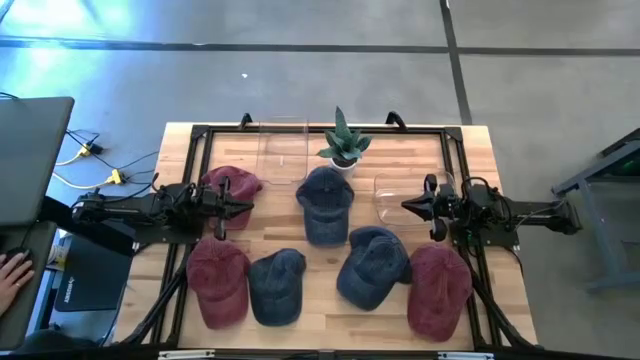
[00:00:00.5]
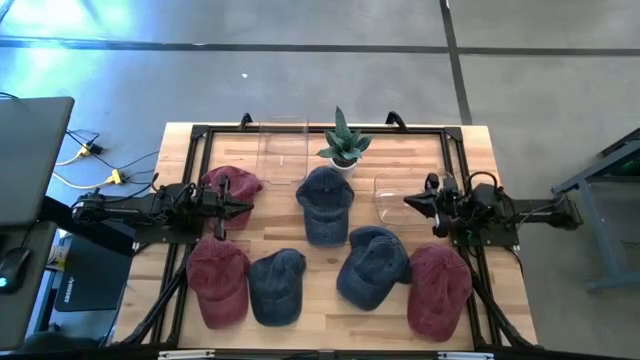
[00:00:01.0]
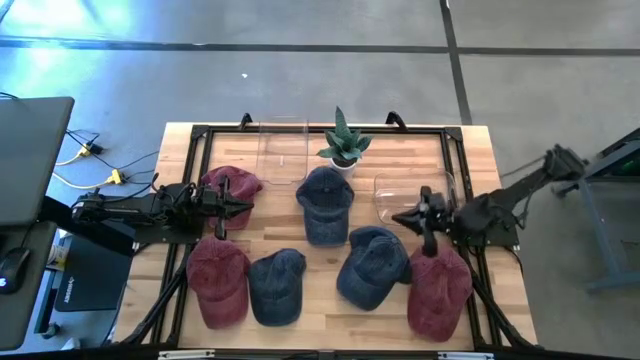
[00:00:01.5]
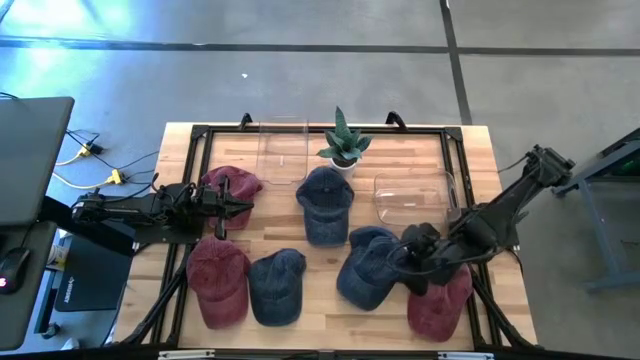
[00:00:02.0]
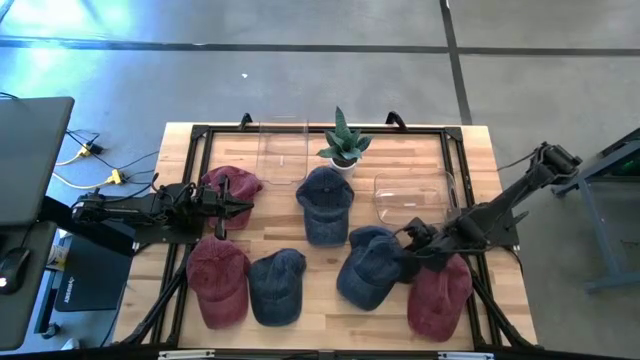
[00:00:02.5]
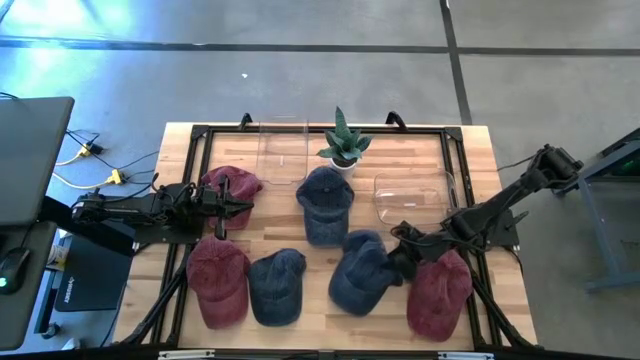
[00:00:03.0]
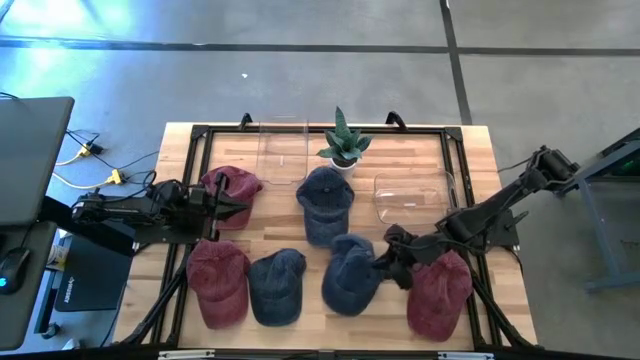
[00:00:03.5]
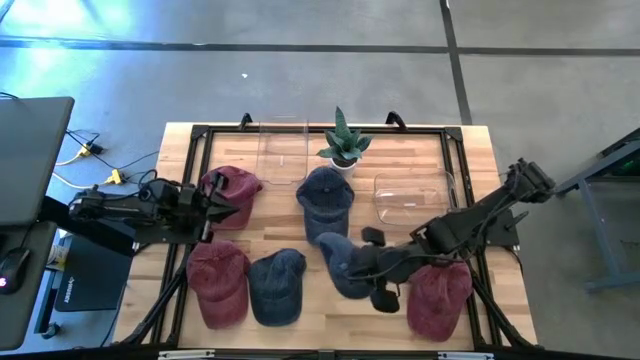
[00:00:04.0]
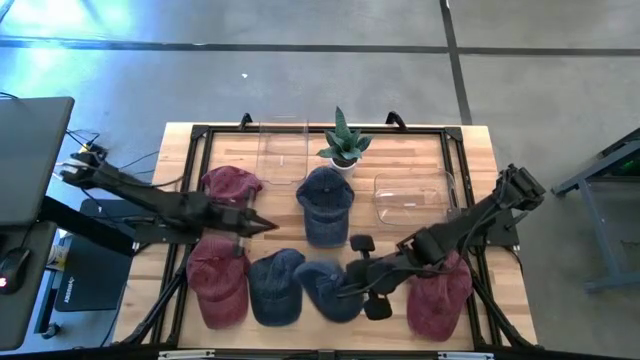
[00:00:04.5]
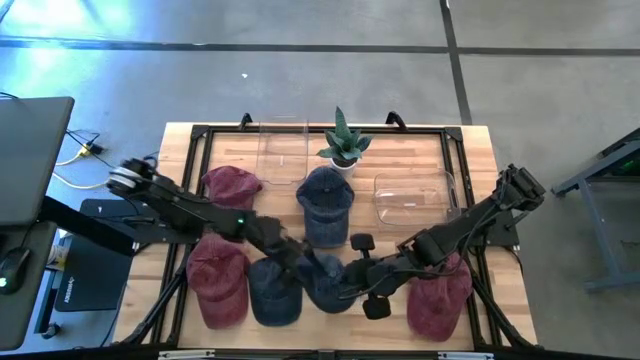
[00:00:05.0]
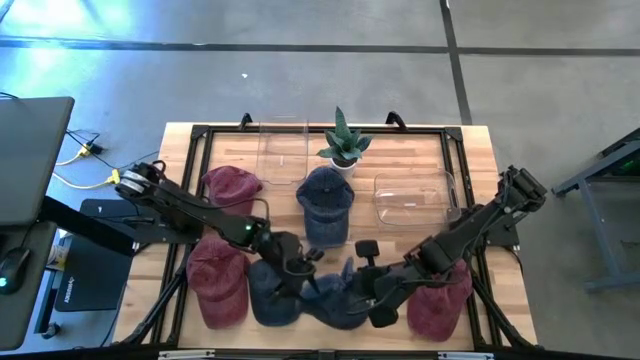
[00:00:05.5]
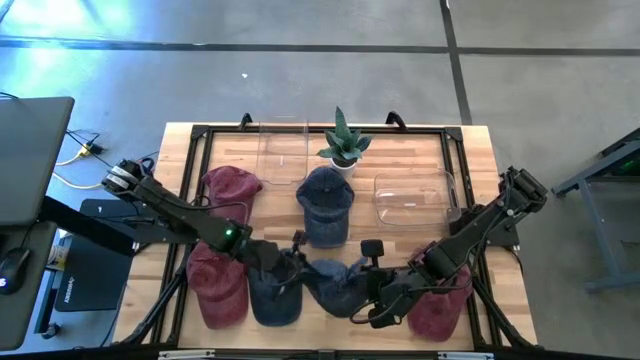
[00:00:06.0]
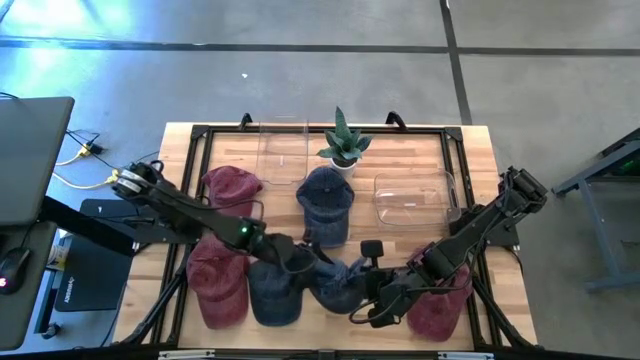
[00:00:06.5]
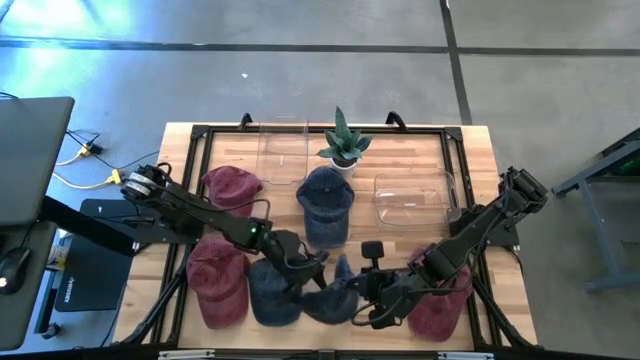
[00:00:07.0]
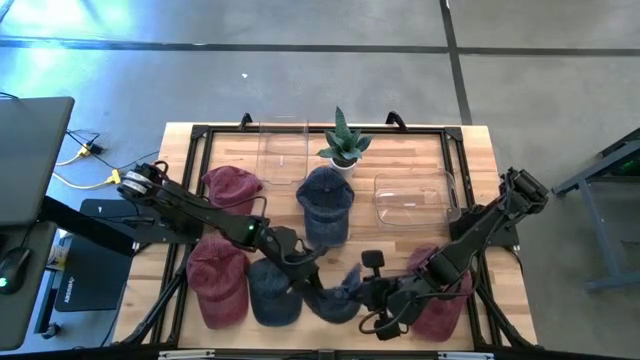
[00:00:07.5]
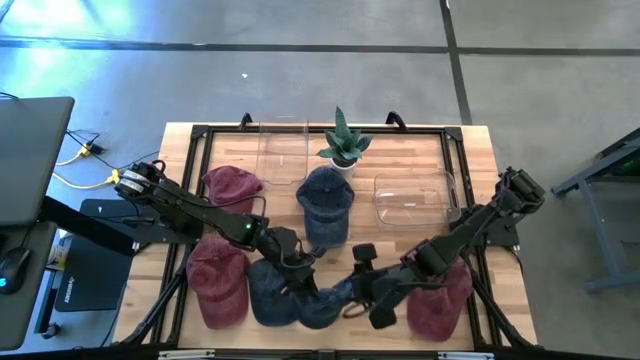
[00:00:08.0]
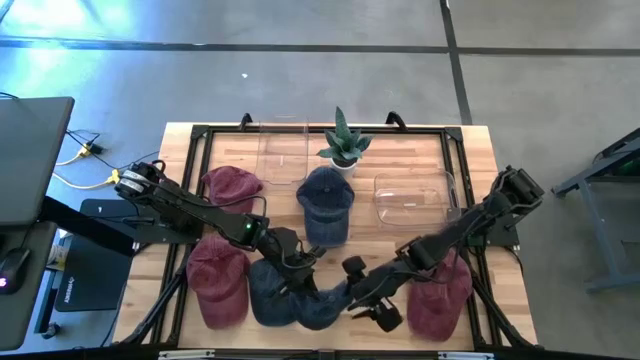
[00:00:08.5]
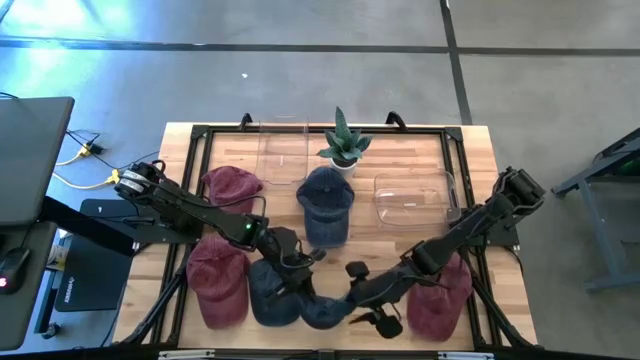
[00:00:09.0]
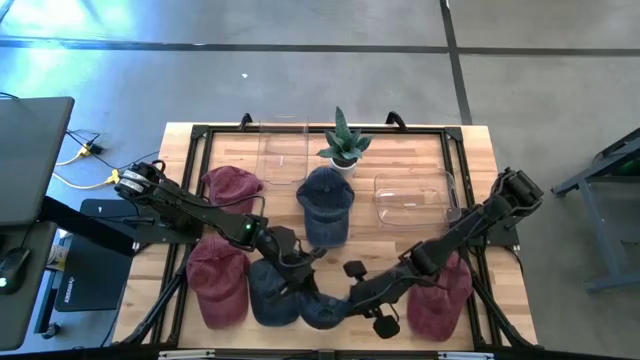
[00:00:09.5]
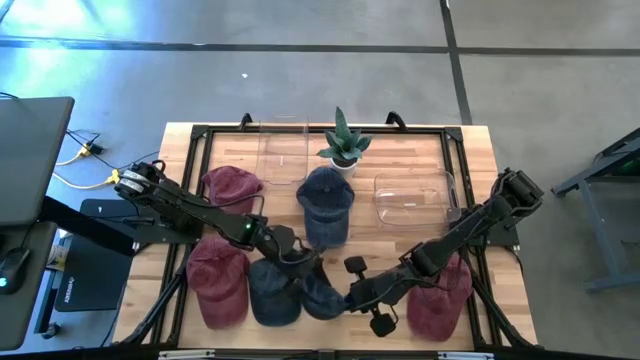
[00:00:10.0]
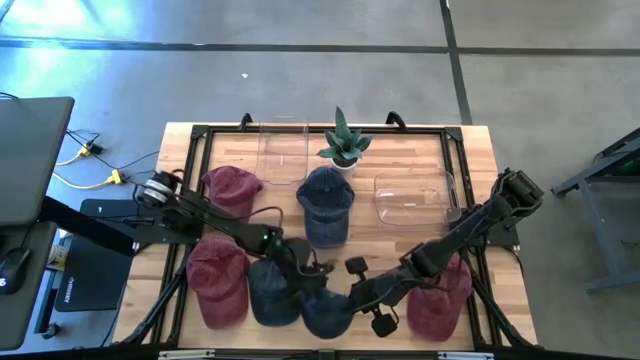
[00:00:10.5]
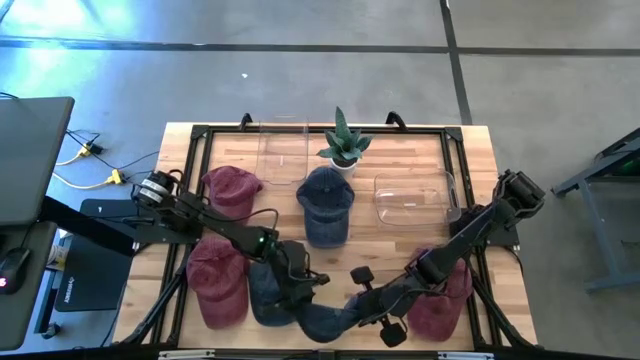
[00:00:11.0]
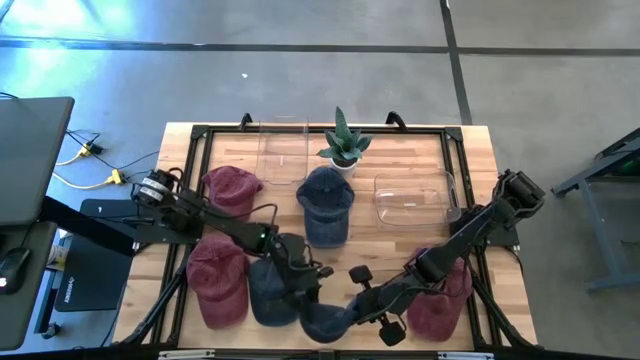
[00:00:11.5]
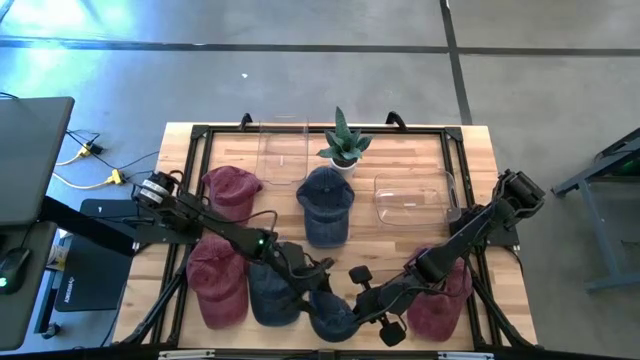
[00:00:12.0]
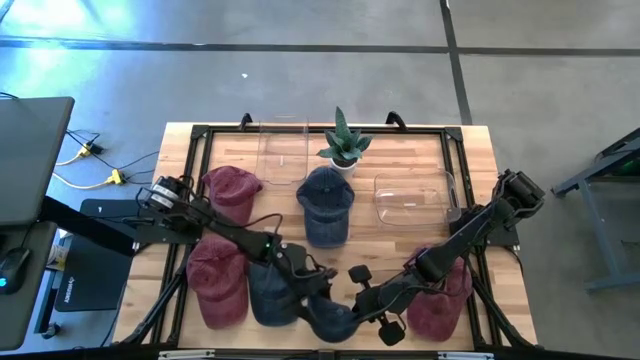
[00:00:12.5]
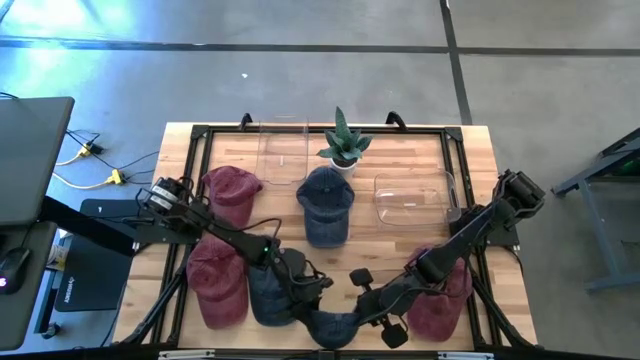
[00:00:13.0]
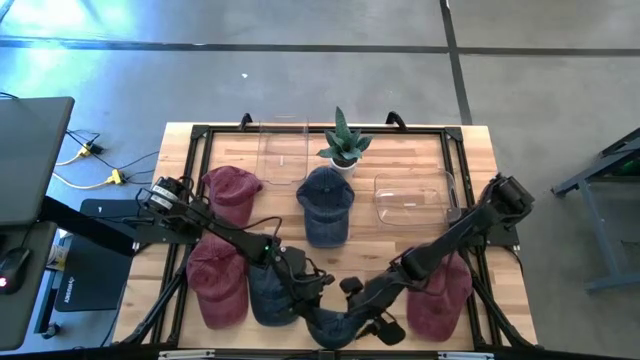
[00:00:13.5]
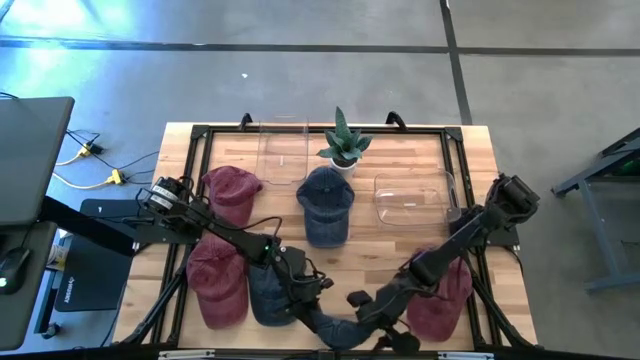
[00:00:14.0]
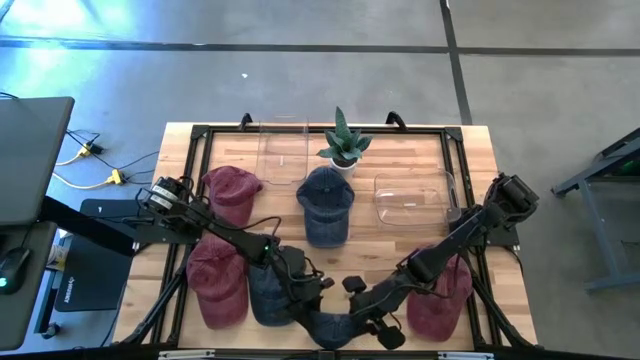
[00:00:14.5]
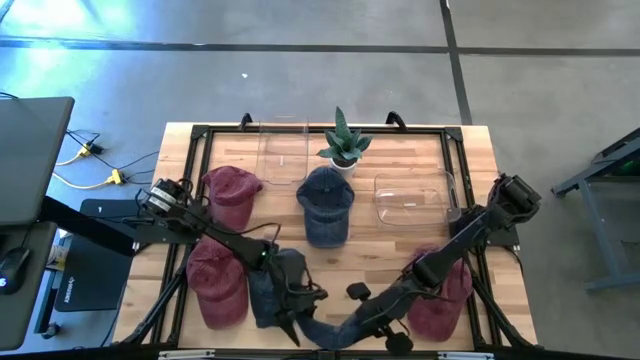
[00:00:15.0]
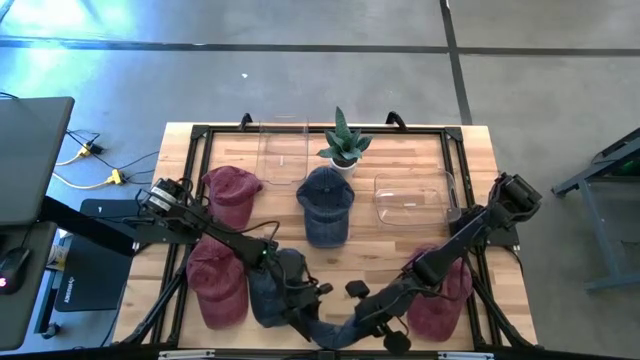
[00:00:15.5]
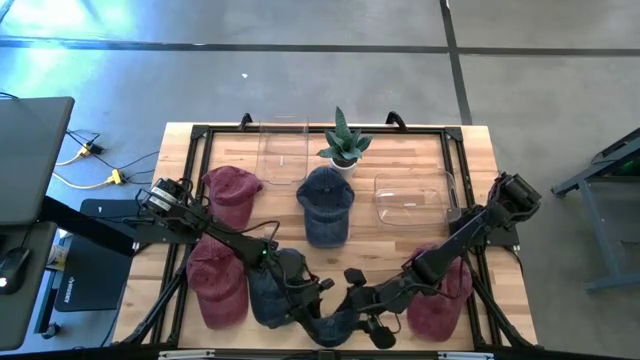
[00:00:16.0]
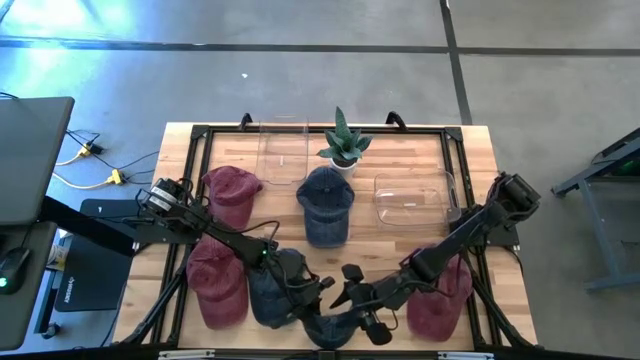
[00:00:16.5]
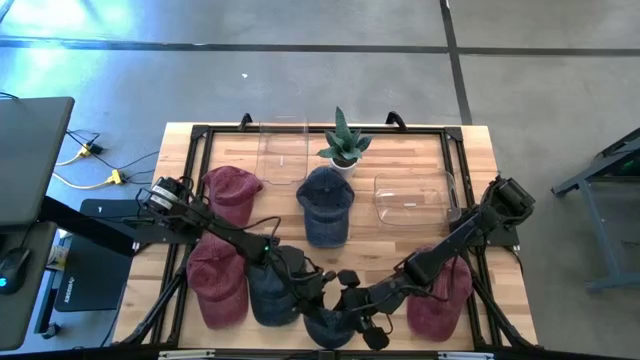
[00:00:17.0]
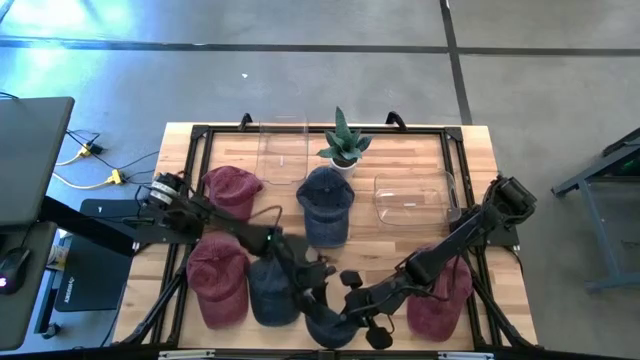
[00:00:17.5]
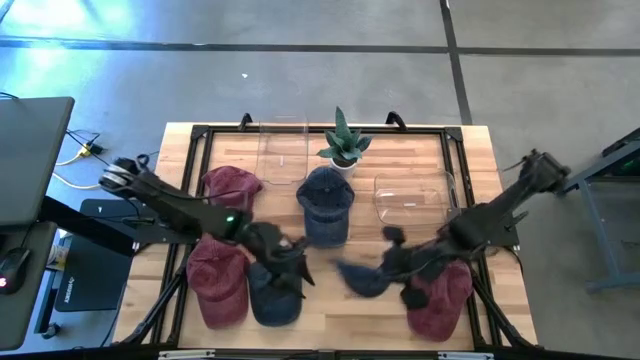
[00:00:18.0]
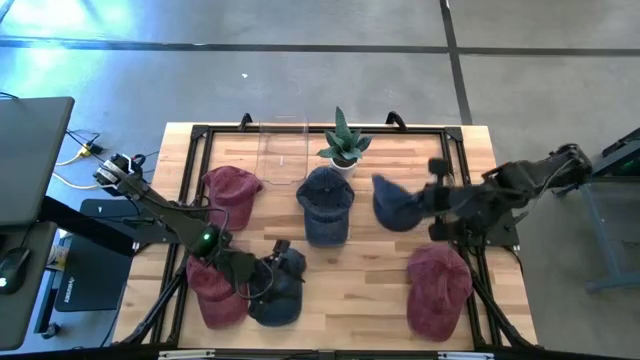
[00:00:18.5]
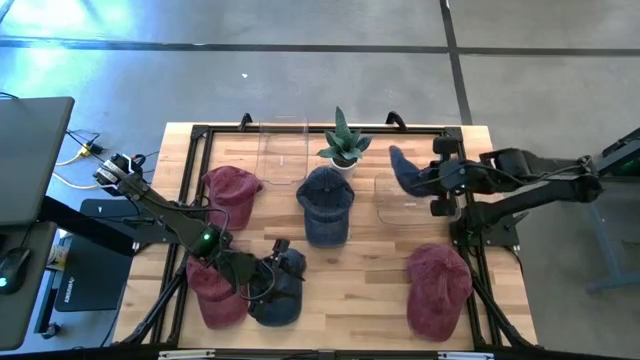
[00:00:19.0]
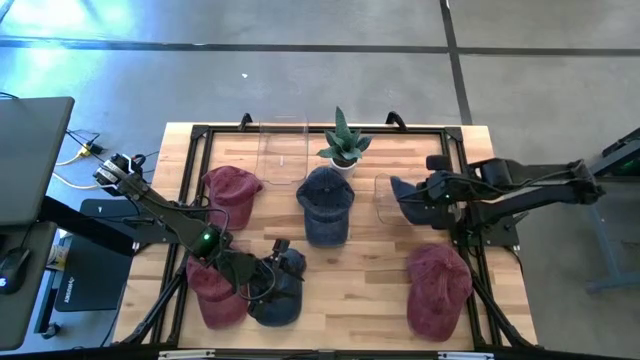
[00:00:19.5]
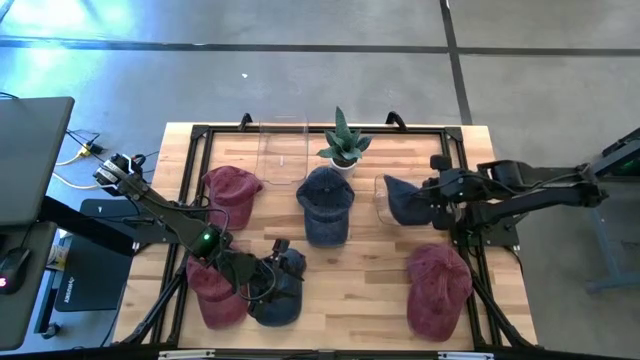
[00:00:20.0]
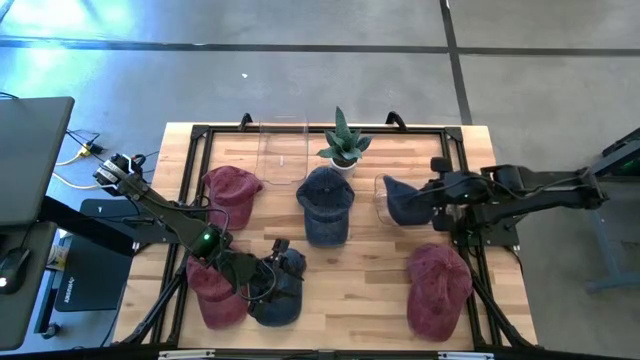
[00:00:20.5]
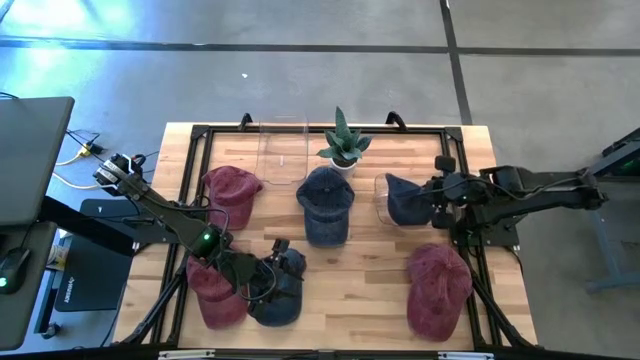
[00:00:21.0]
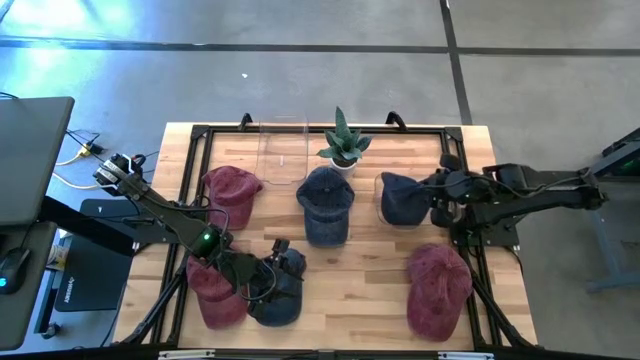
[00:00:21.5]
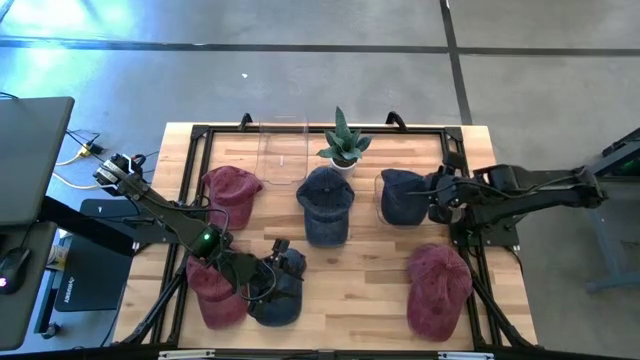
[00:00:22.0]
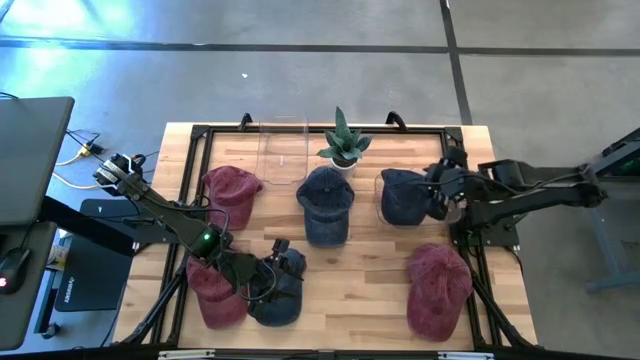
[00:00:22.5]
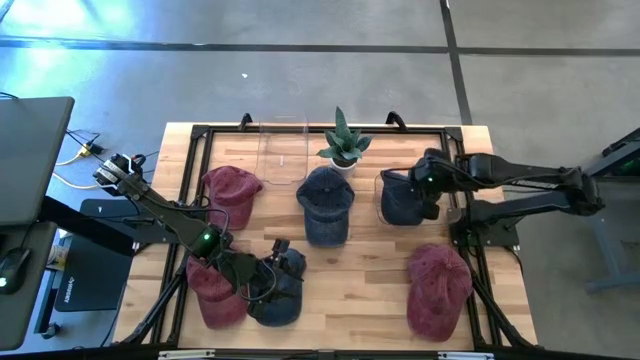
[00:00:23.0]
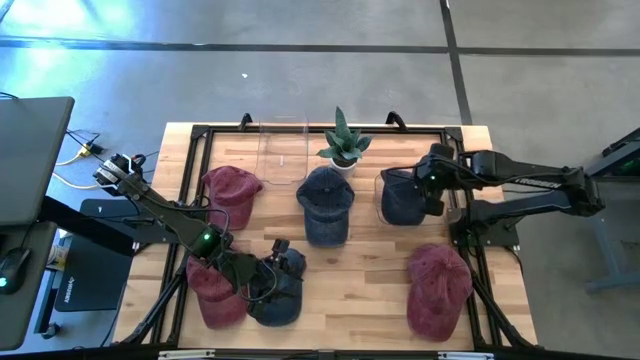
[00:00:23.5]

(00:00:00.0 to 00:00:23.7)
Task: Pick & Place hat
Put the right blue cap into the right transparent bin
